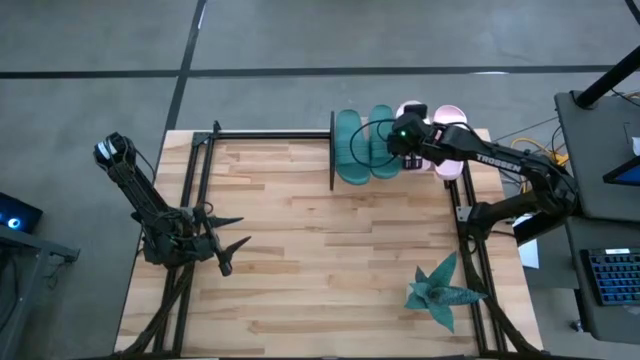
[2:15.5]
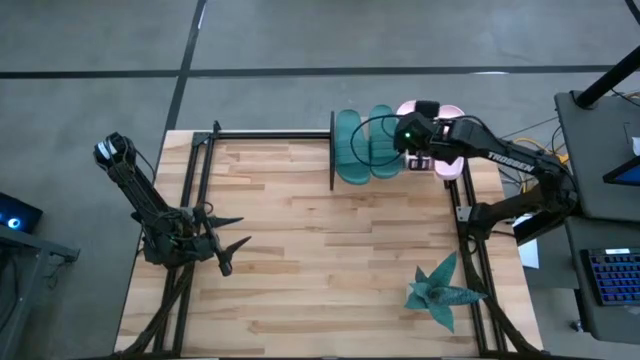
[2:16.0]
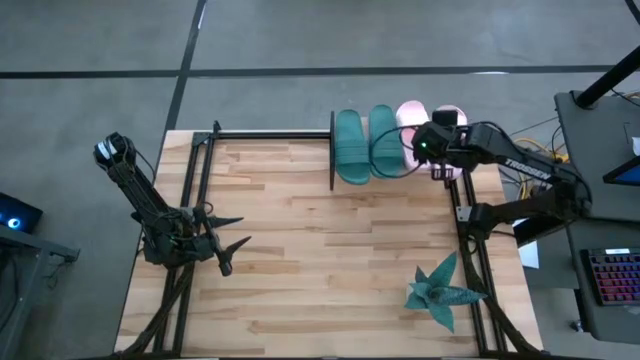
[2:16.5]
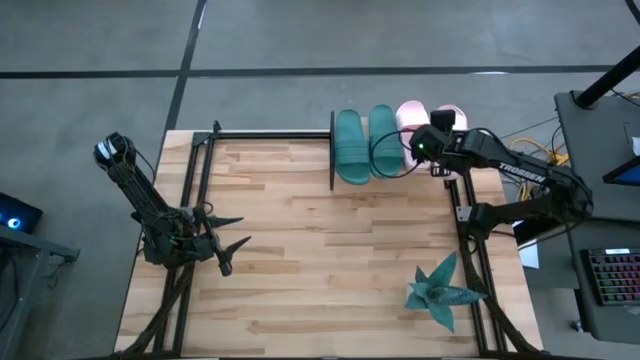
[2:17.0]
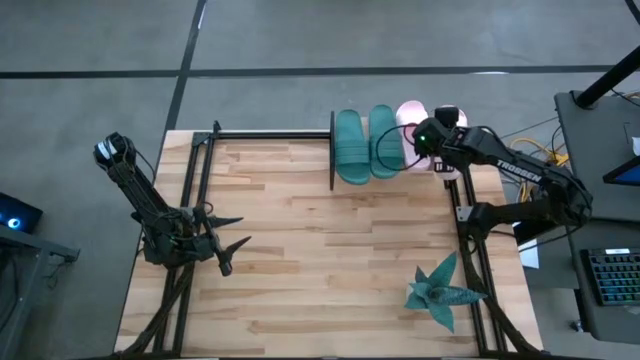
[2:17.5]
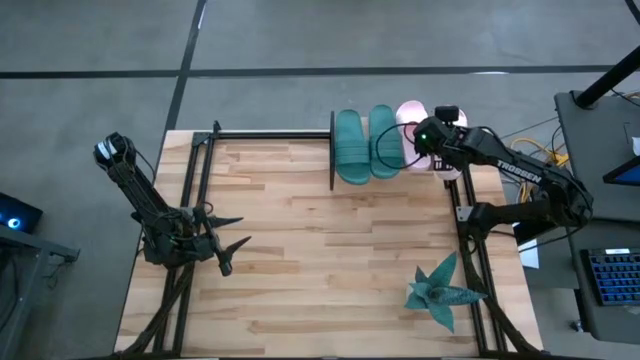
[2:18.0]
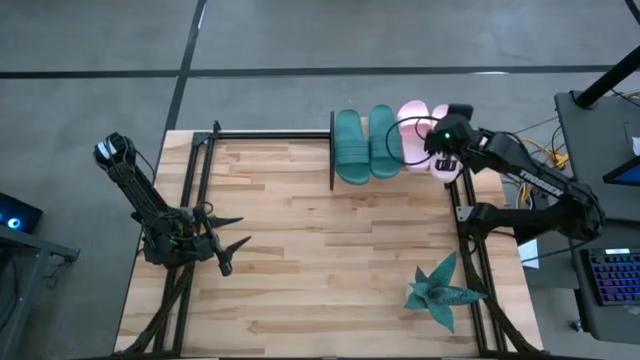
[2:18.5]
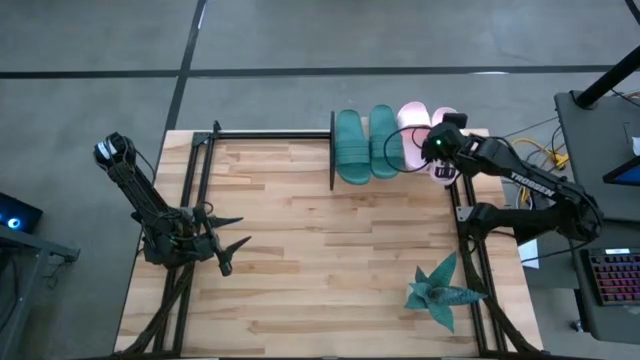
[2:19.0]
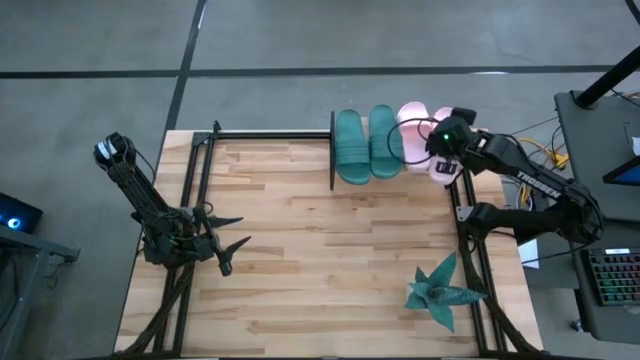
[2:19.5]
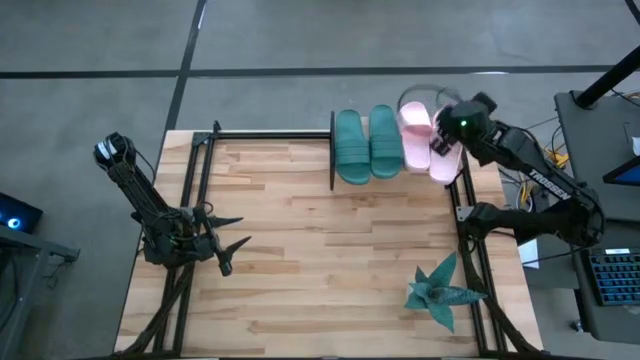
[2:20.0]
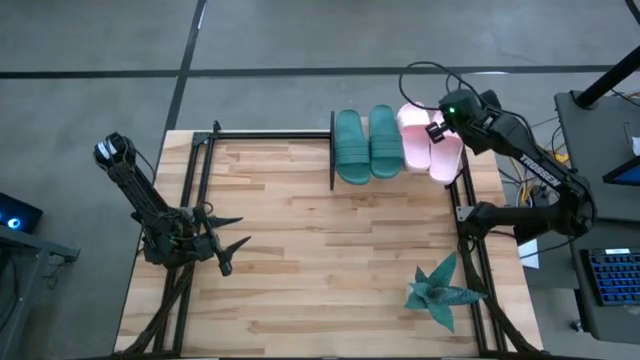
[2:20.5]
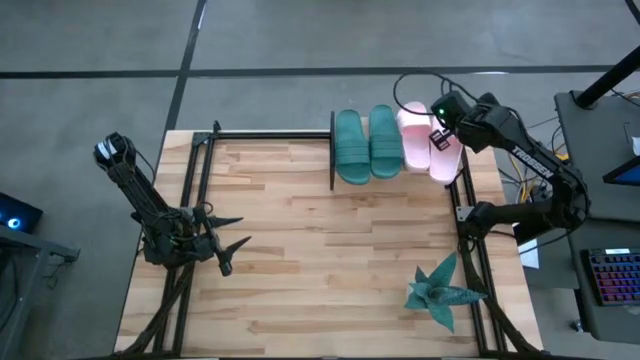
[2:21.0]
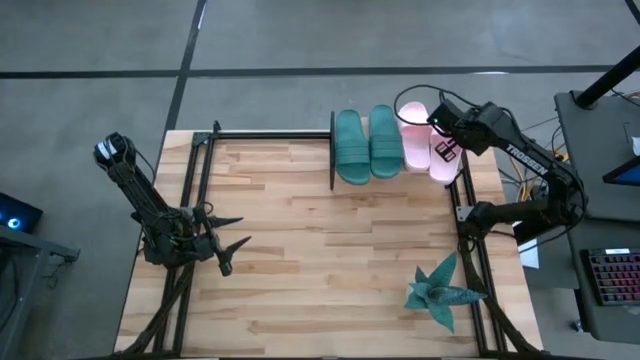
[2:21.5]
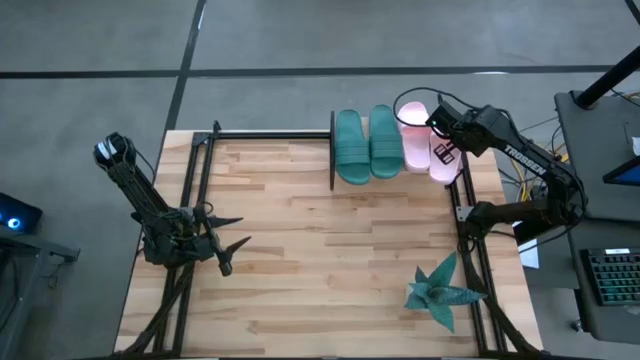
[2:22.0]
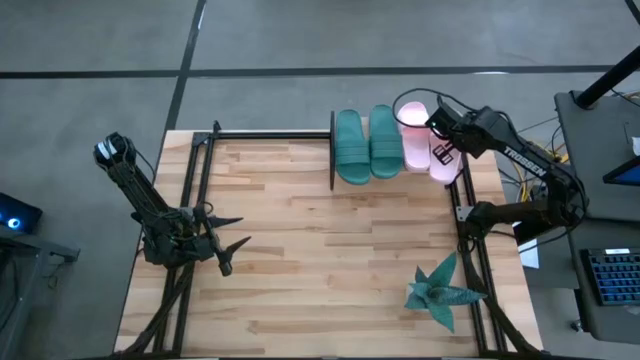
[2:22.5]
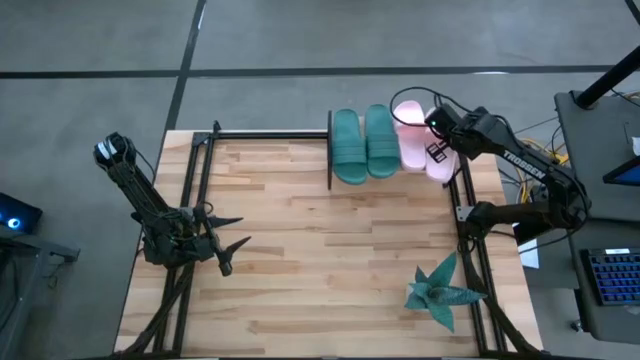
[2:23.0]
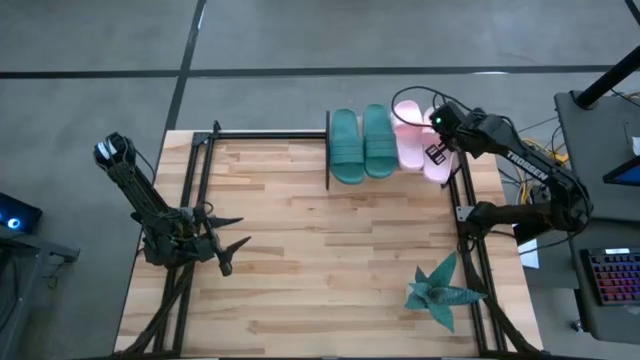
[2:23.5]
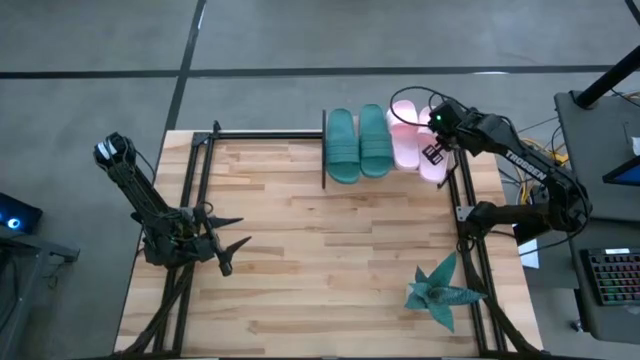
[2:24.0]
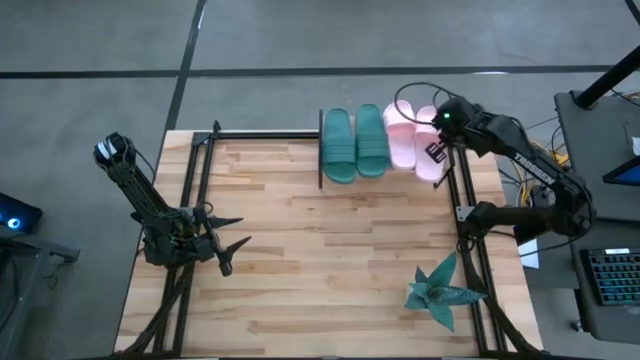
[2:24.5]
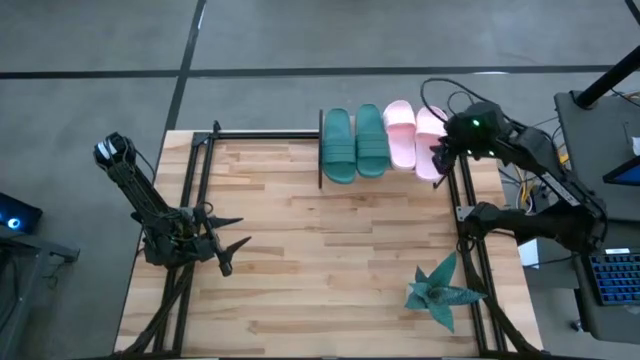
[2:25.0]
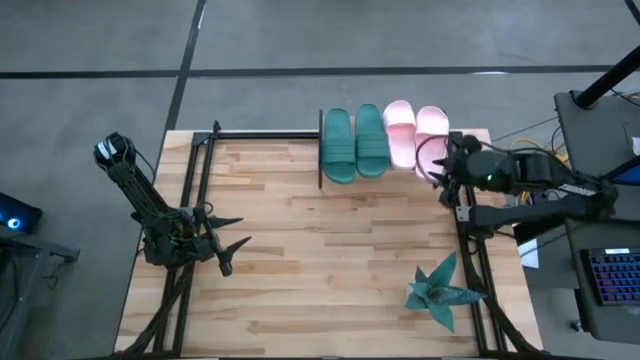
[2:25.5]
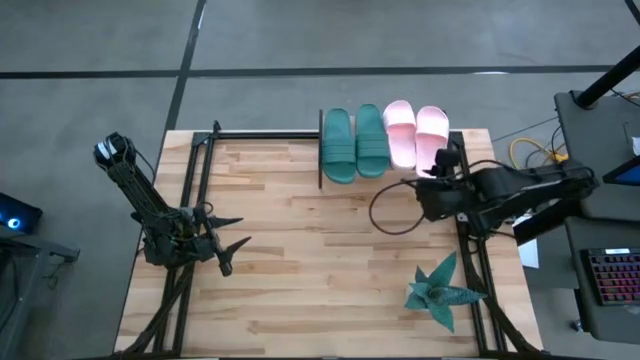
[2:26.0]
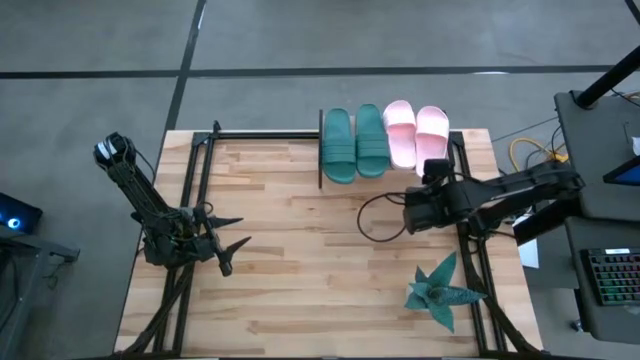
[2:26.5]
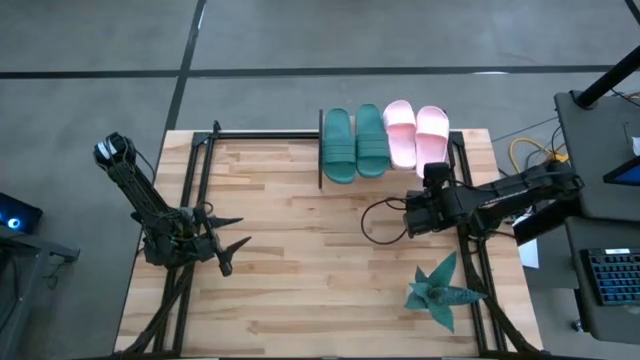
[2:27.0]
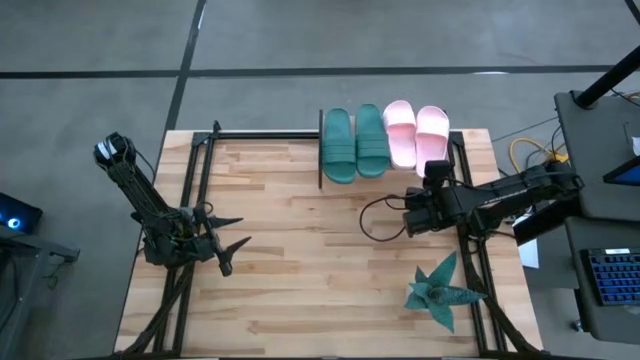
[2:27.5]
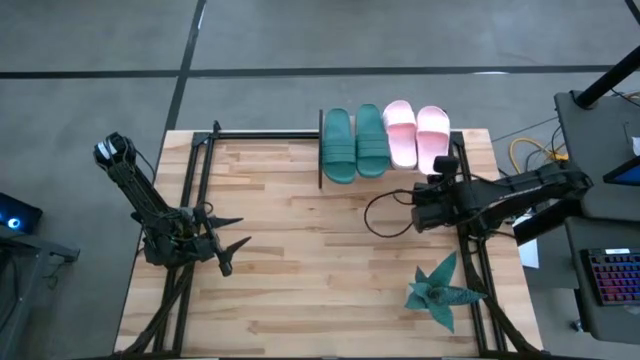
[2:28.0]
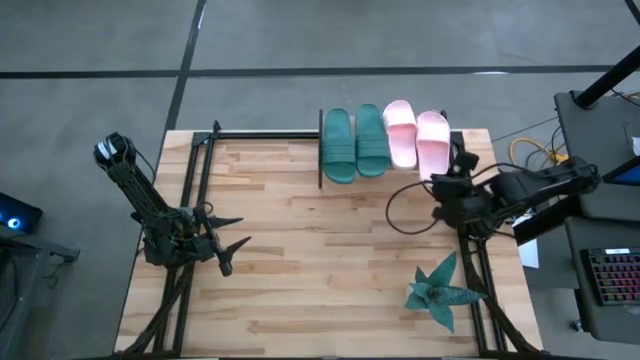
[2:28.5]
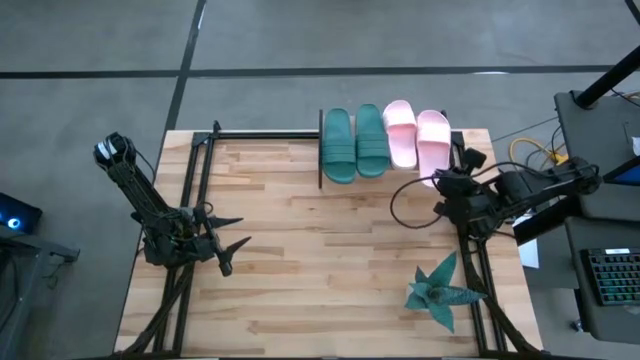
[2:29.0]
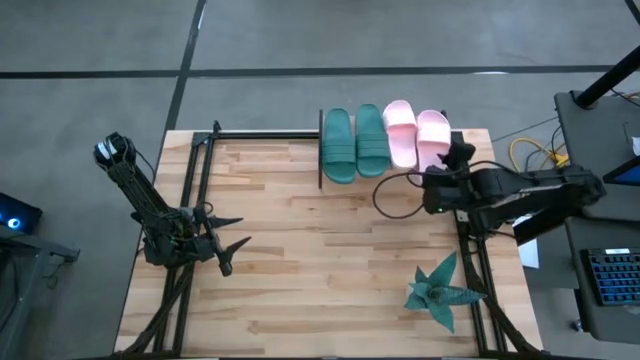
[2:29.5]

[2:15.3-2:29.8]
Task: Pick and place slides into the shelf
Adjust the right pink slipper

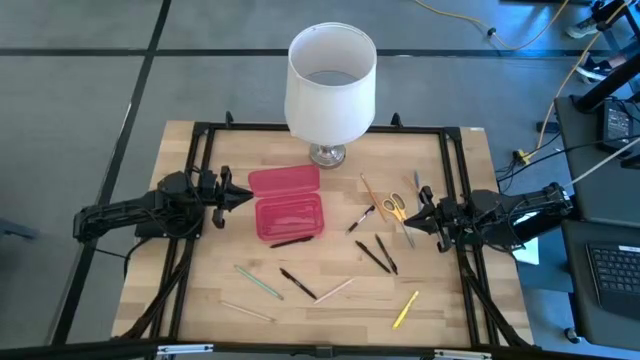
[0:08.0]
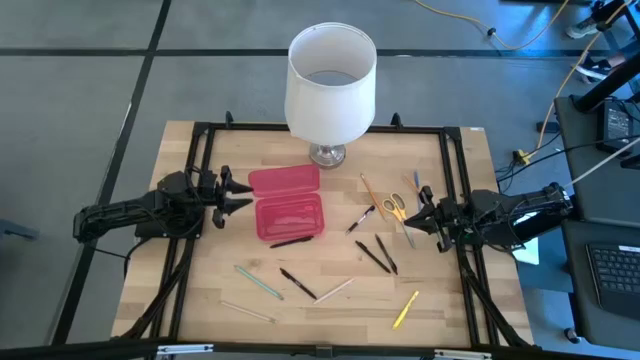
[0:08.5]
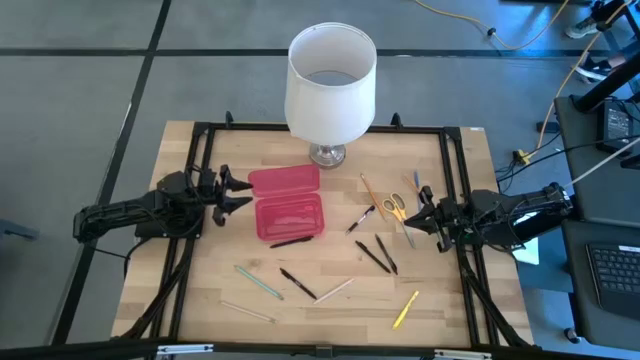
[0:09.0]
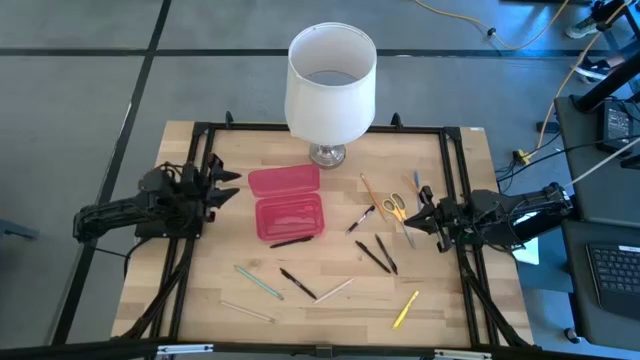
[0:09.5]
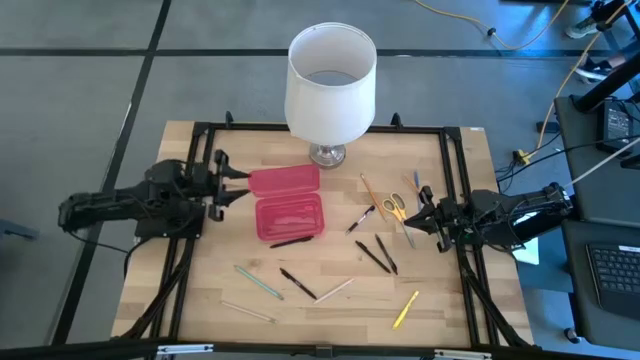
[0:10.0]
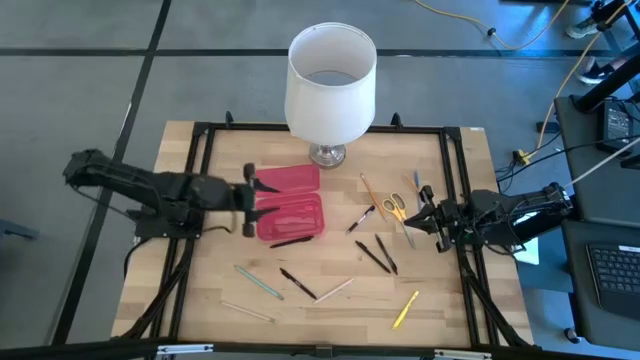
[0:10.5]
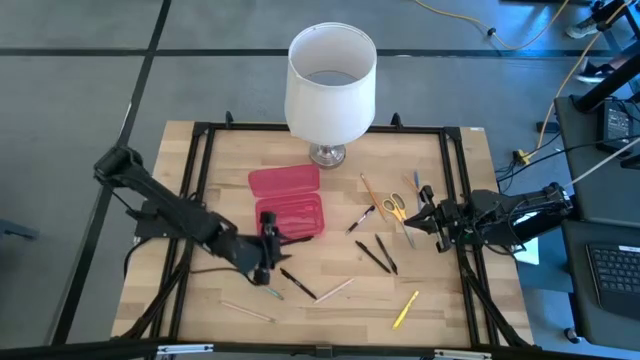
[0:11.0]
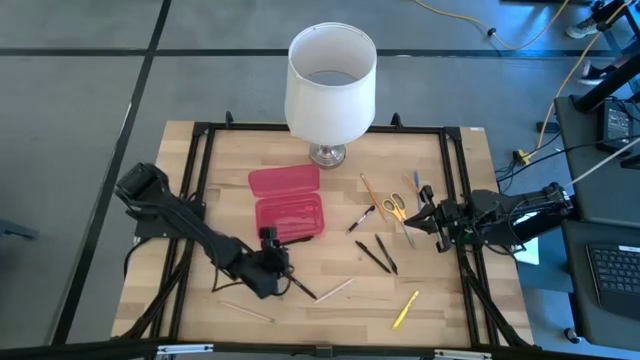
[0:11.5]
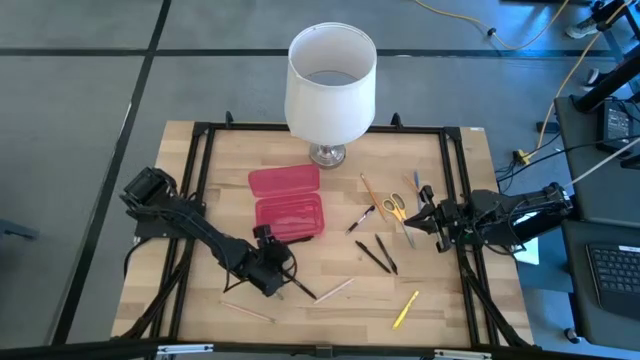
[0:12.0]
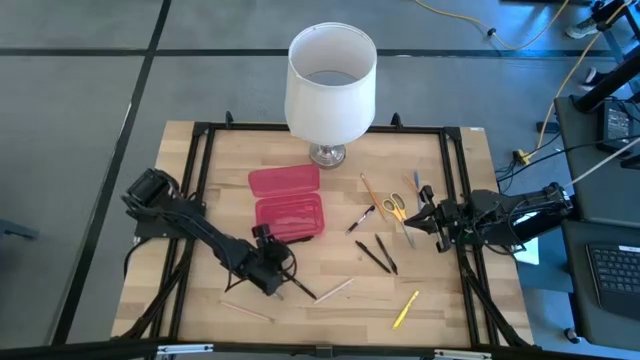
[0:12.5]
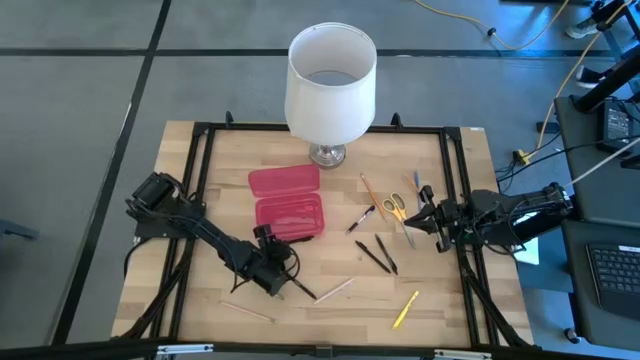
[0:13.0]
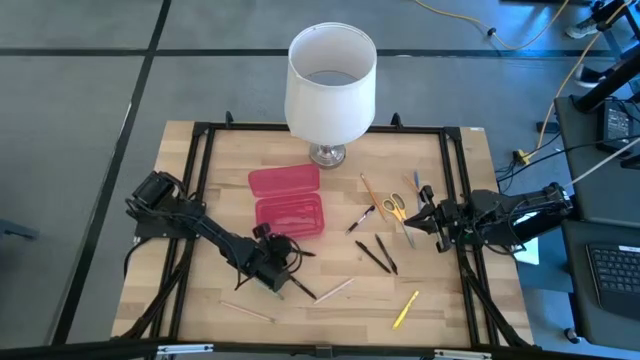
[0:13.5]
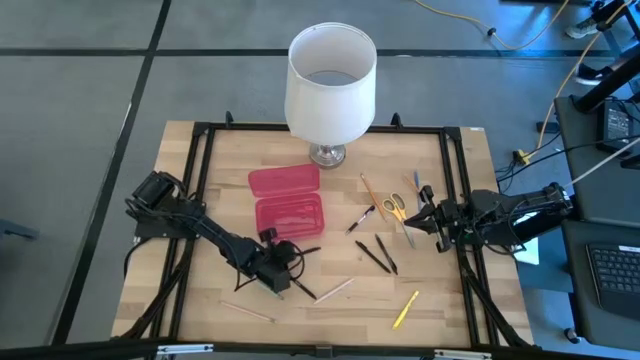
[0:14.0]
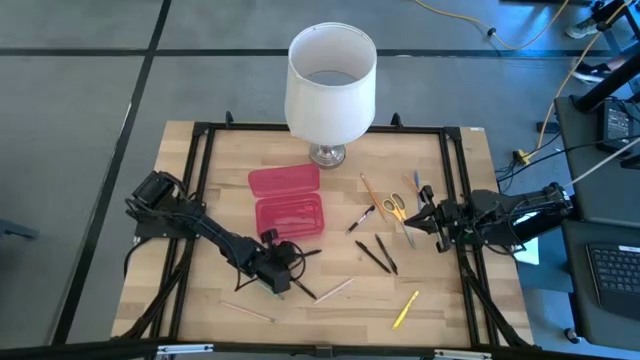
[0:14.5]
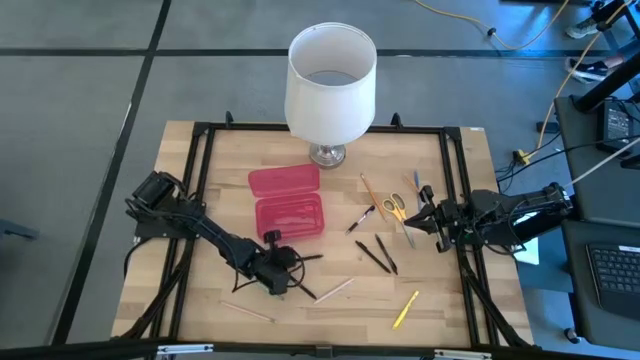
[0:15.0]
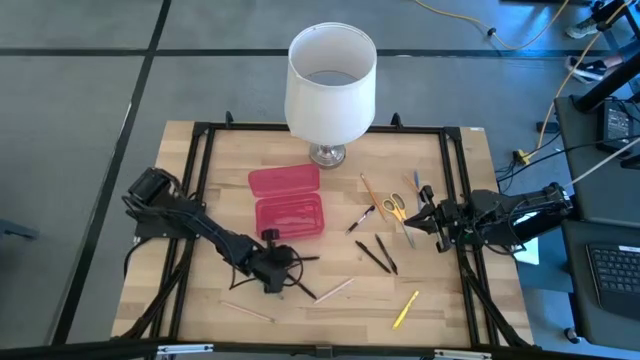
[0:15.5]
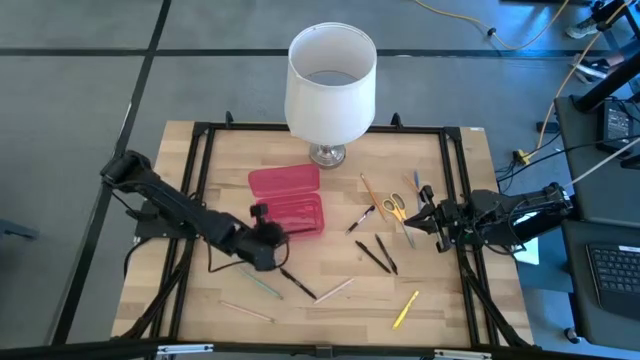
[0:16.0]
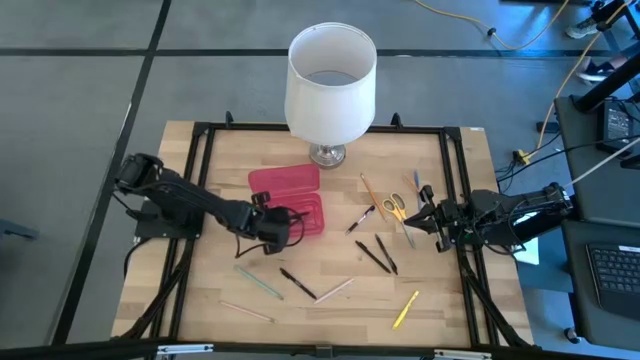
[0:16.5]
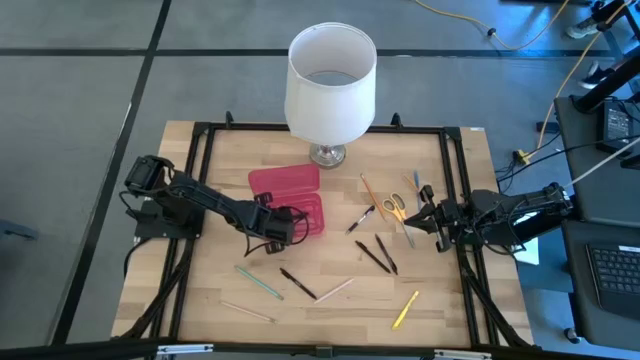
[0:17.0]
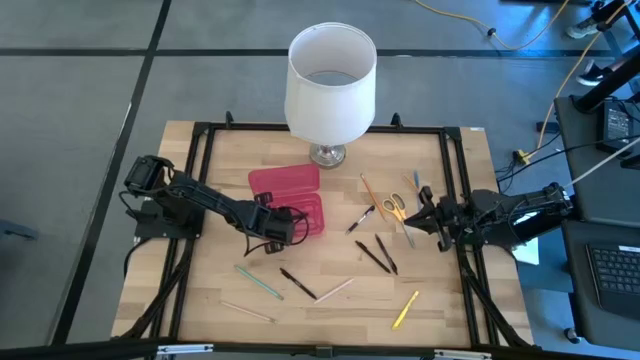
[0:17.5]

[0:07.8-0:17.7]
Task: Pick & place school supplies into a supply box
Put the top left black pen into the red supply box
